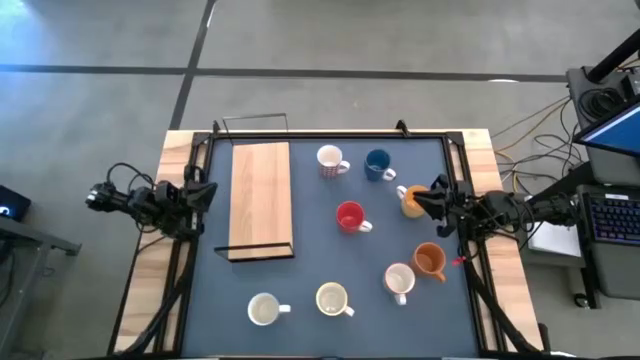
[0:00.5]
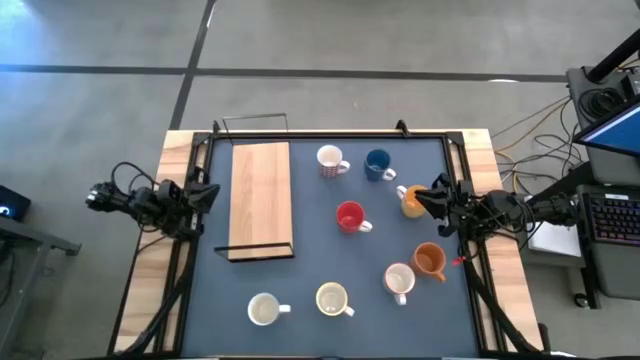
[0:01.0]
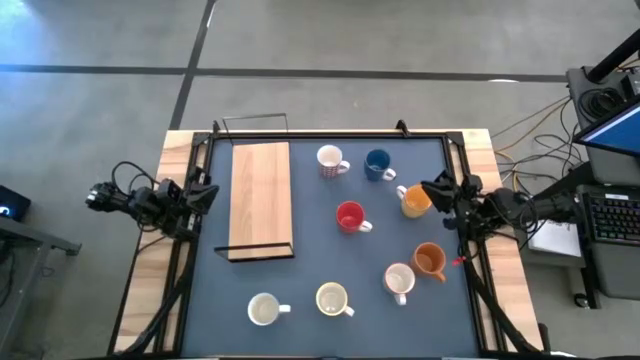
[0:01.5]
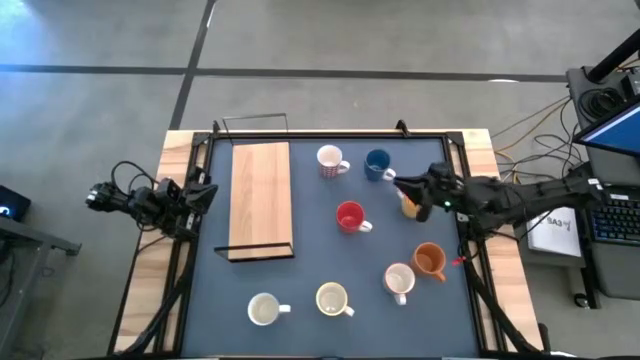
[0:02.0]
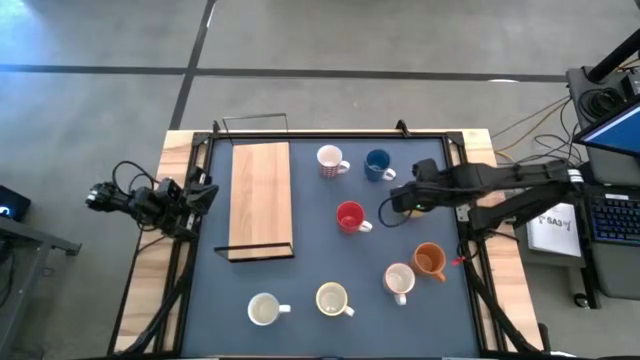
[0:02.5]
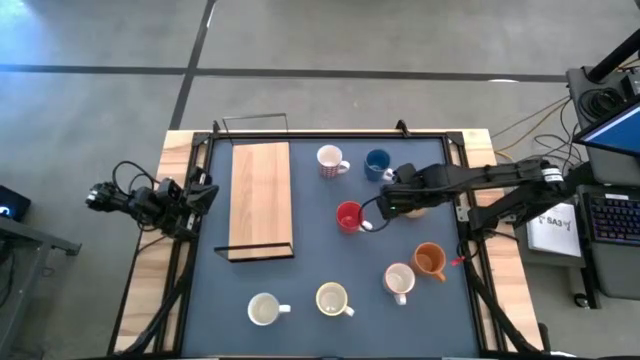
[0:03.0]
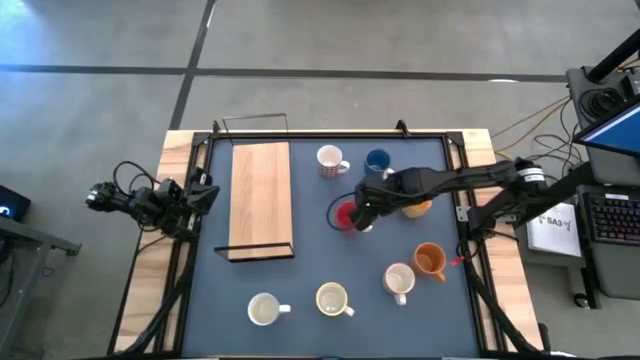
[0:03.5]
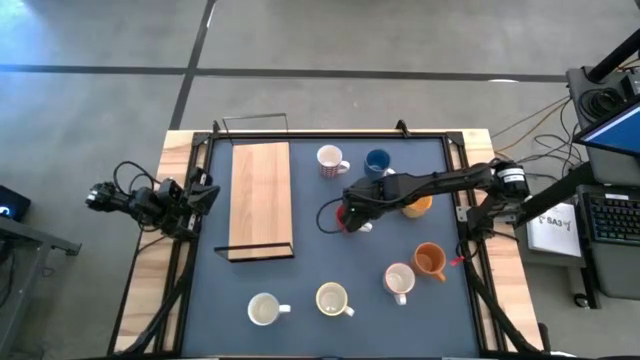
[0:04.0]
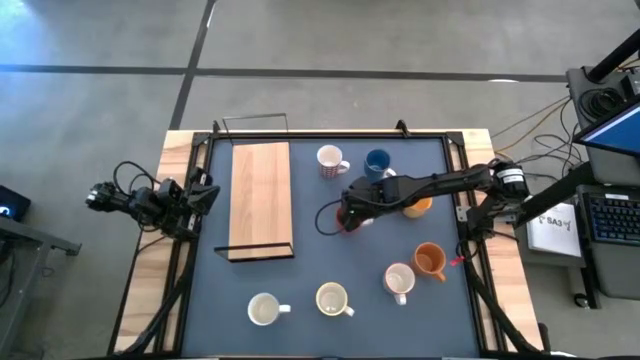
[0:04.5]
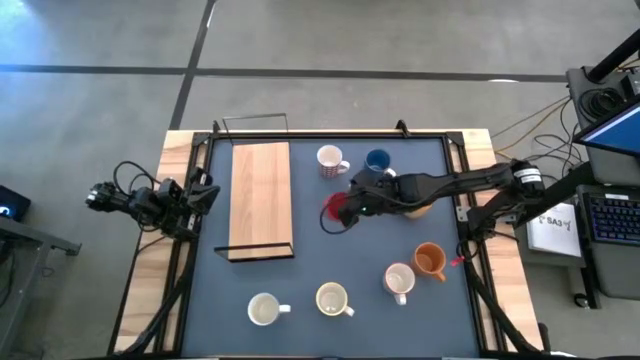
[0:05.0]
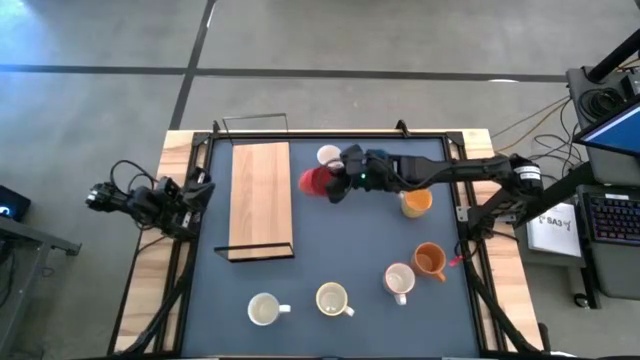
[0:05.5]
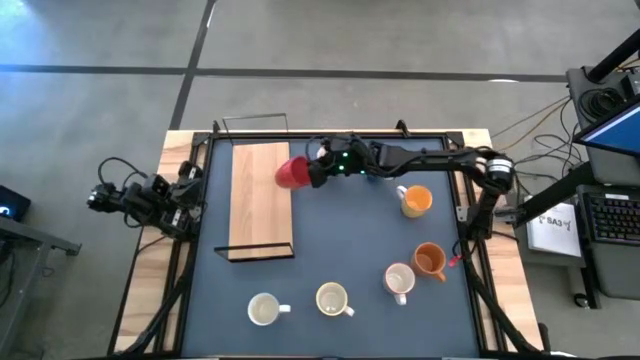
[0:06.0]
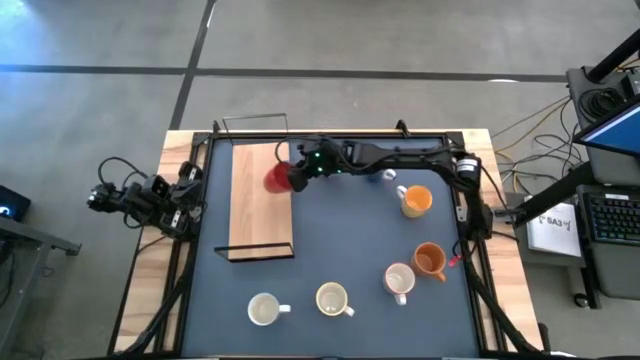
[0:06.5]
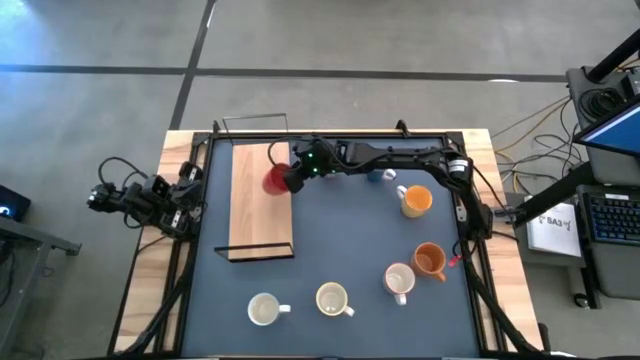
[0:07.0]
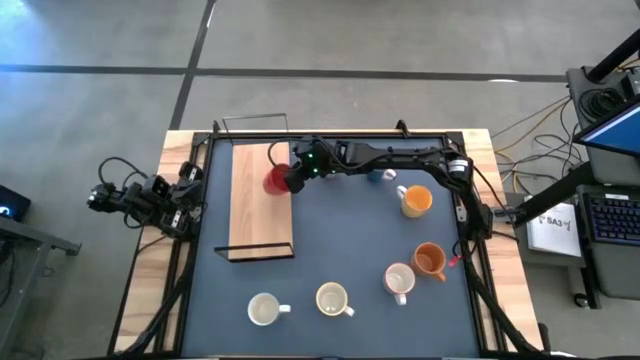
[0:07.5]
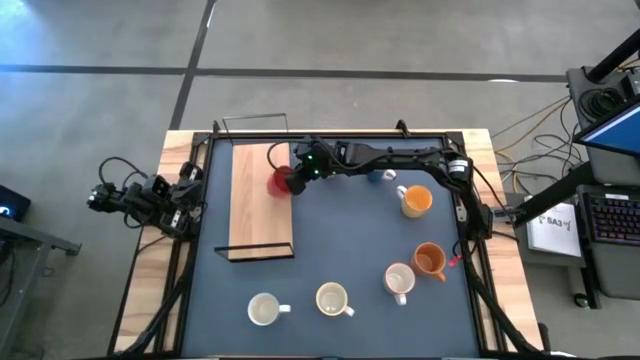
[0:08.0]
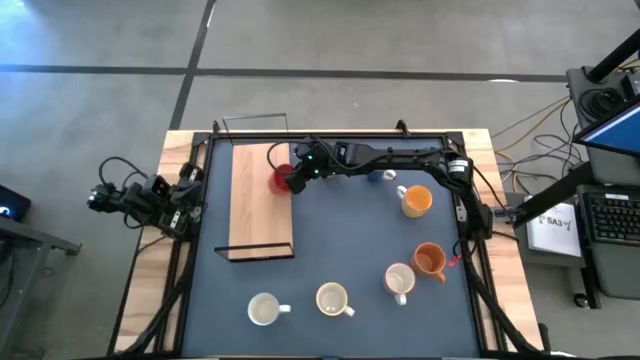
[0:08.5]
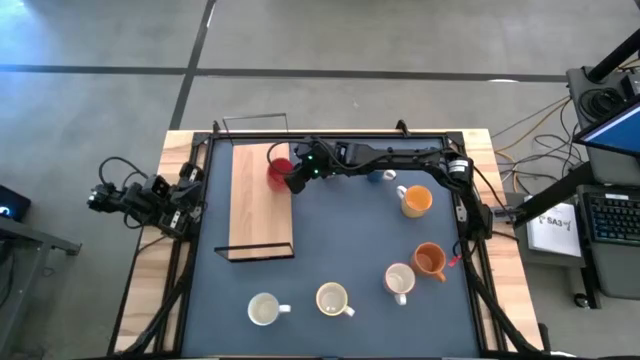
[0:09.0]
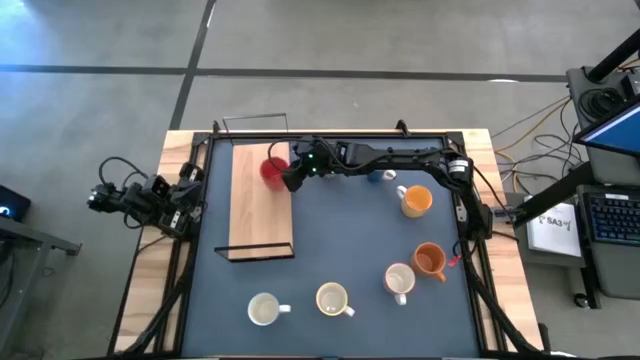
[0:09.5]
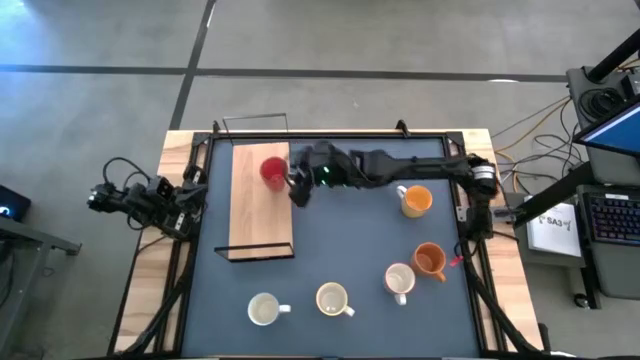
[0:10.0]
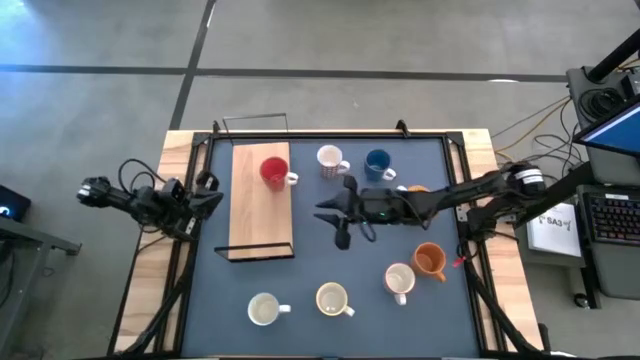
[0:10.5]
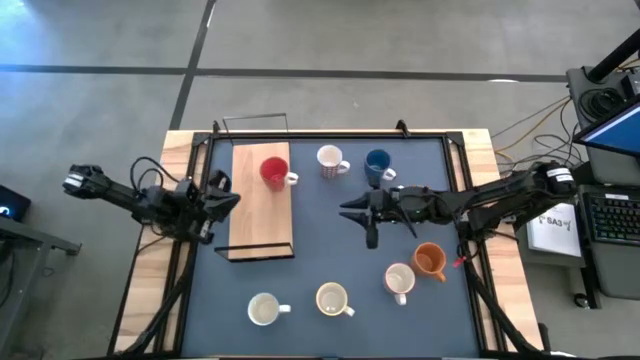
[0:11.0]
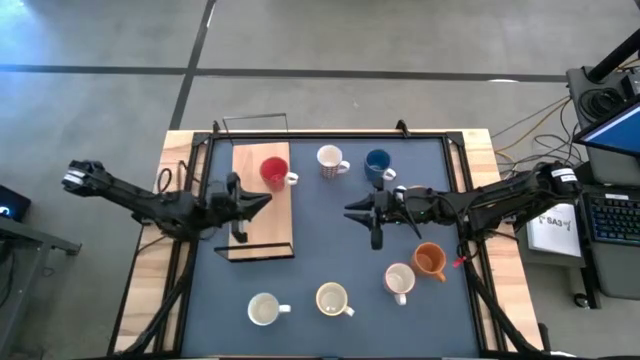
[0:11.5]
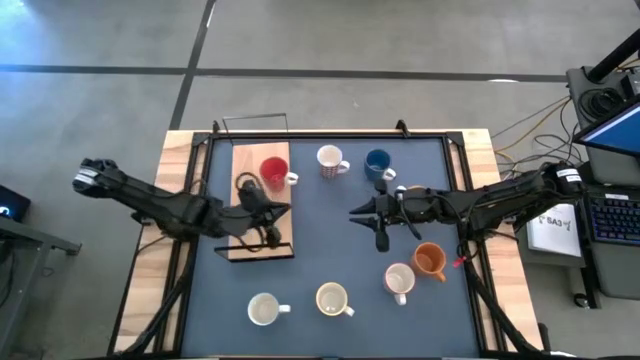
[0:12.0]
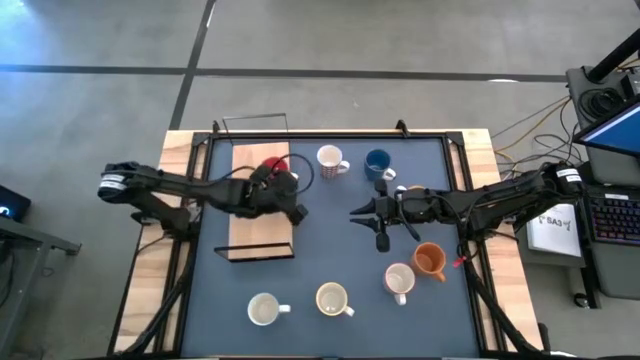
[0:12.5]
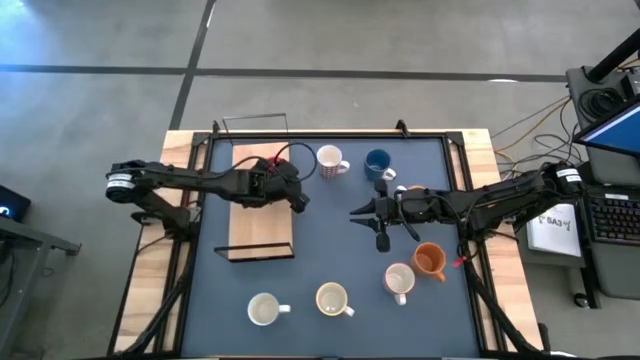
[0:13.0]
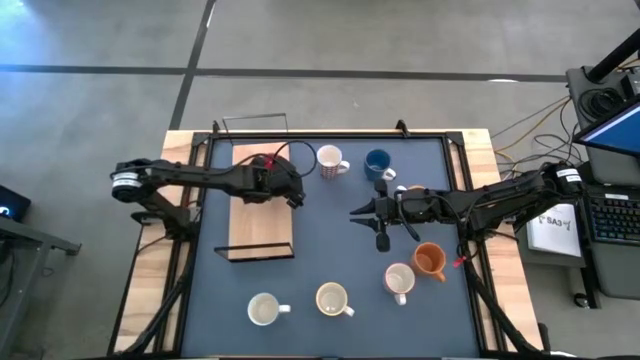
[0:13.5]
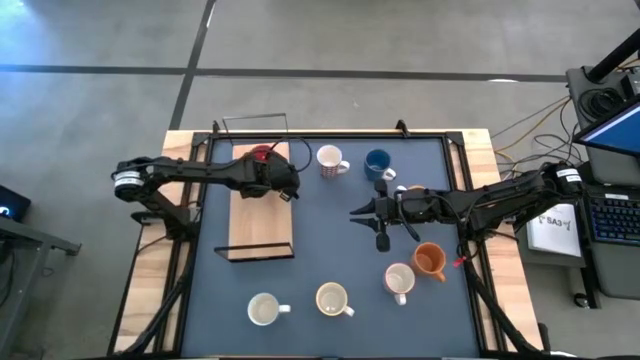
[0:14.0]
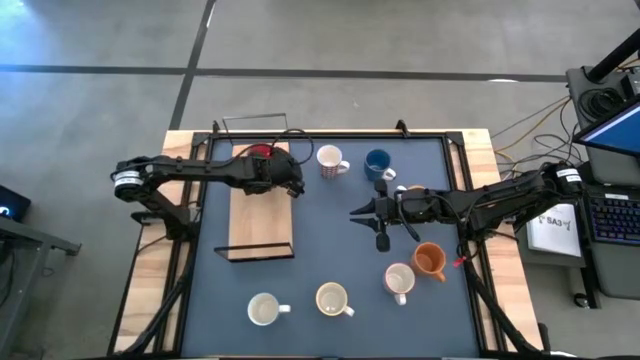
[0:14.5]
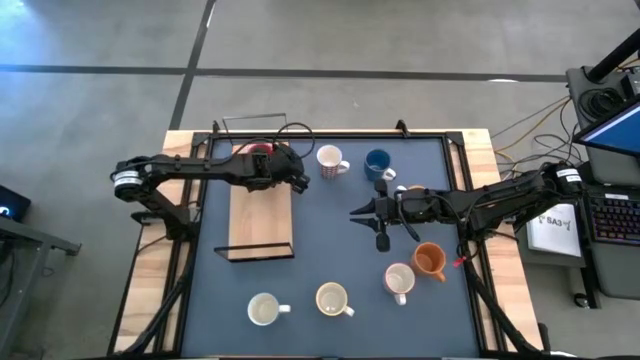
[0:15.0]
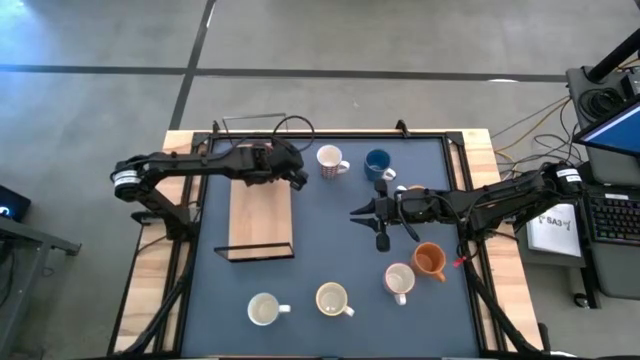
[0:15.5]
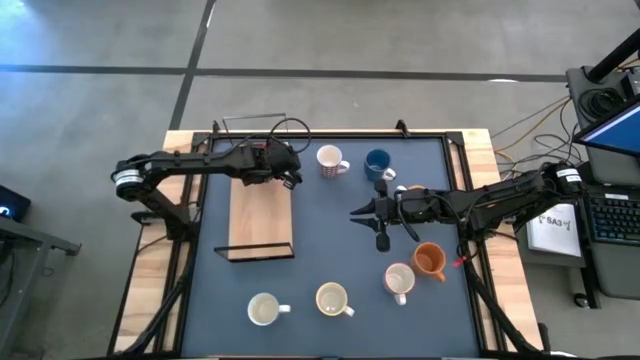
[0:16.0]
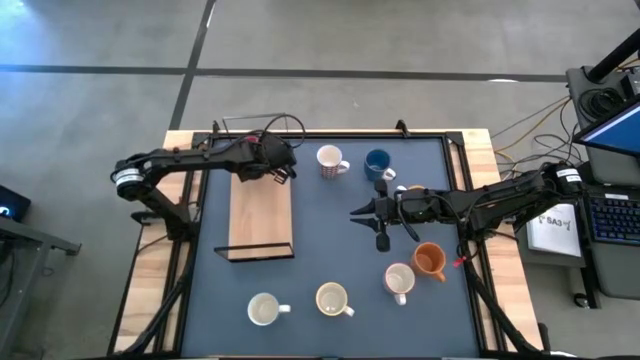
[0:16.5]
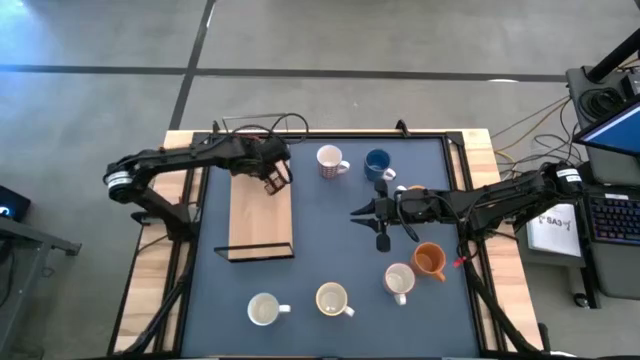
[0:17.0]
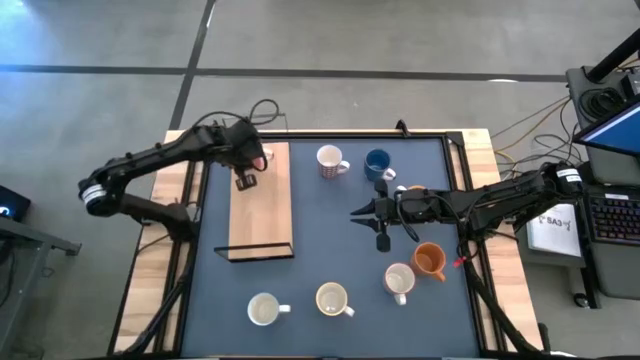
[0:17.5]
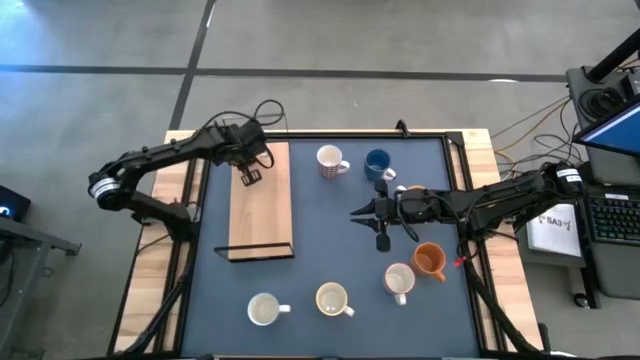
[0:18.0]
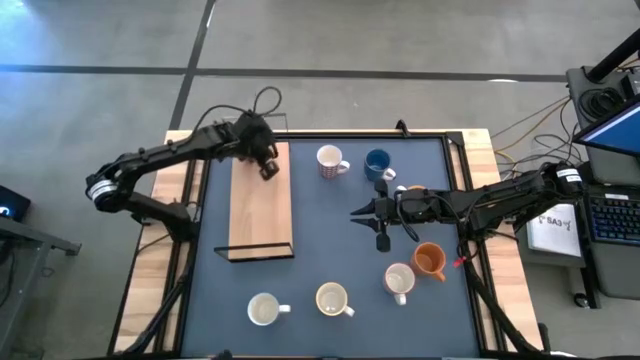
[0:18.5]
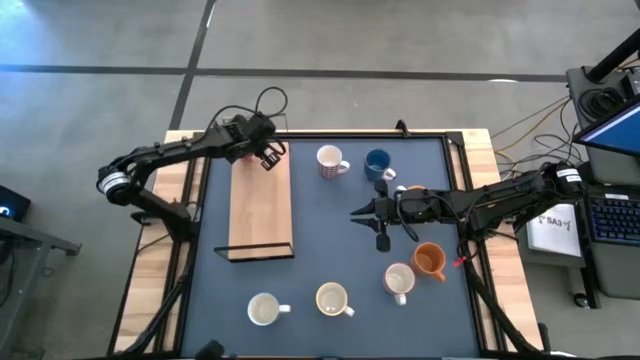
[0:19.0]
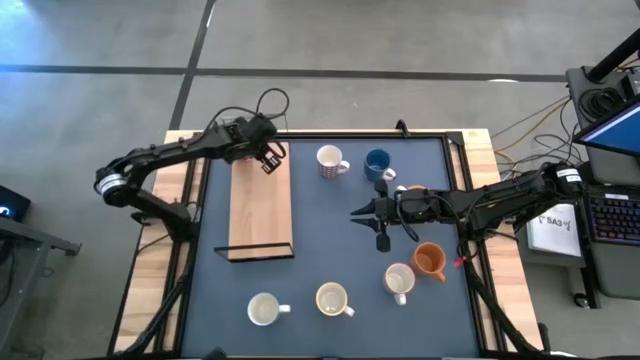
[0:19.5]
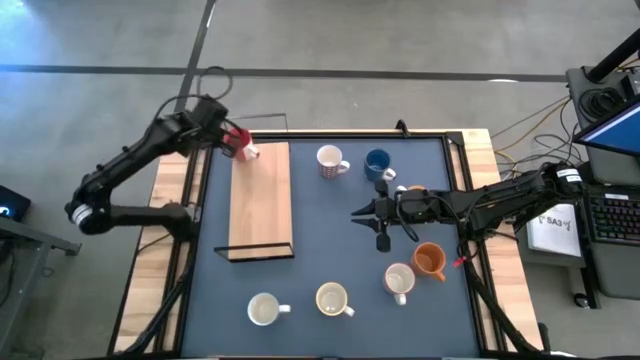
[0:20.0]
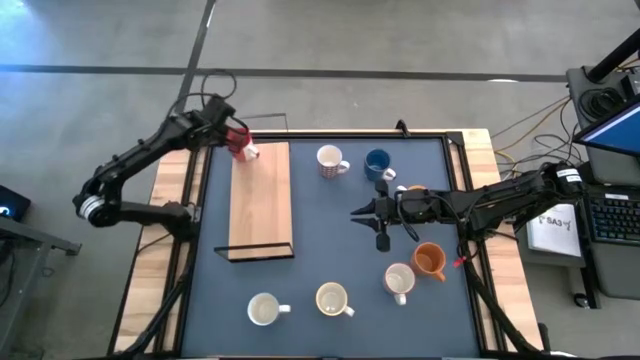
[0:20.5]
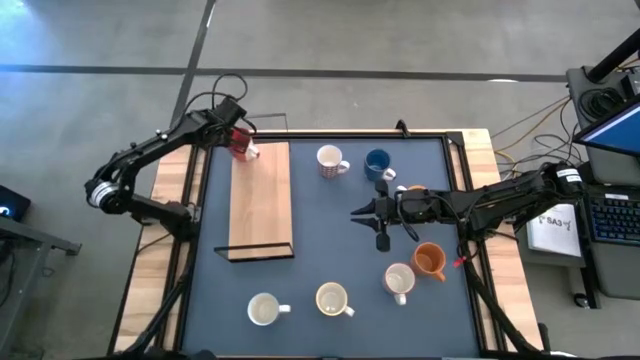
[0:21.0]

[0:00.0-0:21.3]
Task: Place coffee mugs
Put the red mug on the shelf
